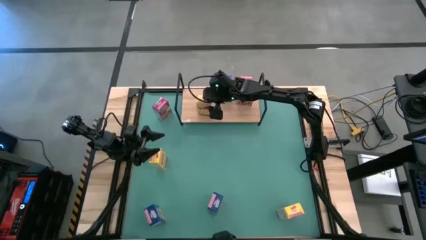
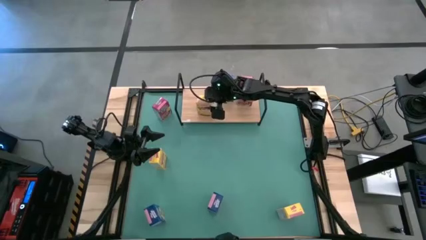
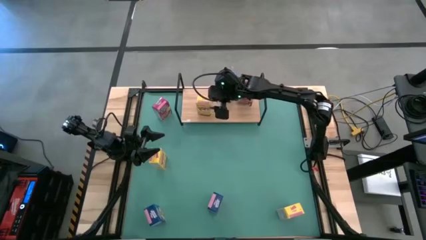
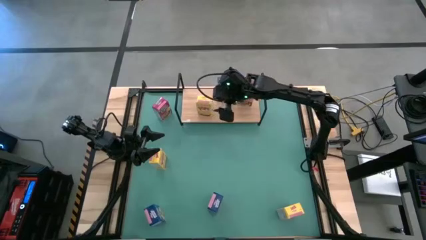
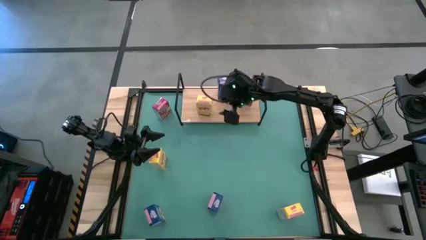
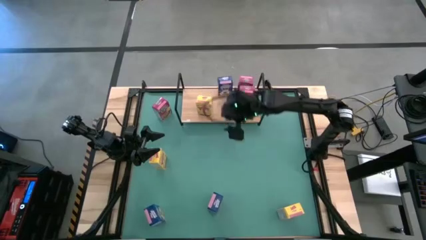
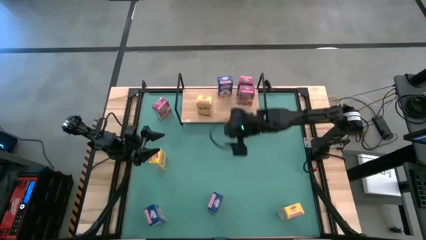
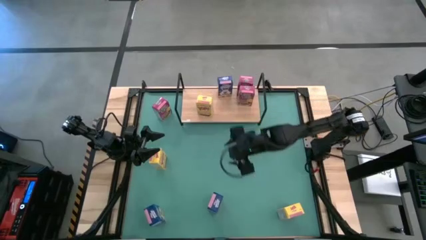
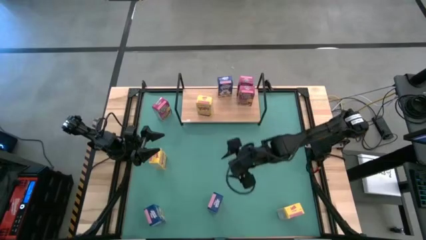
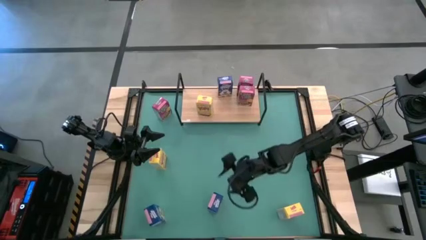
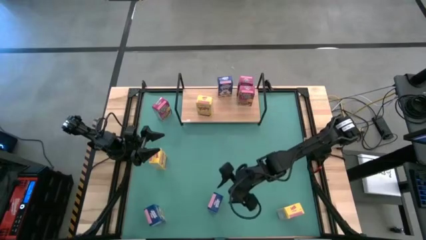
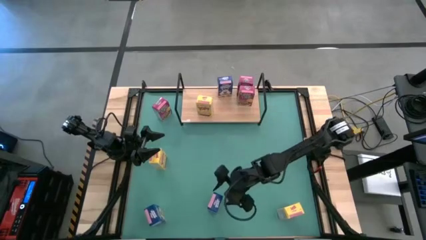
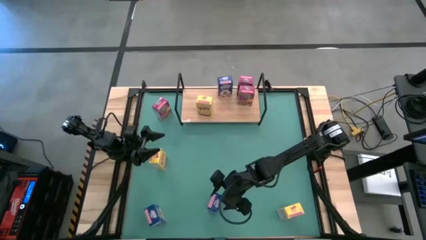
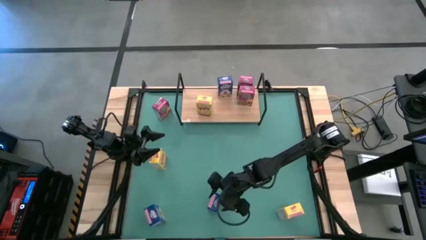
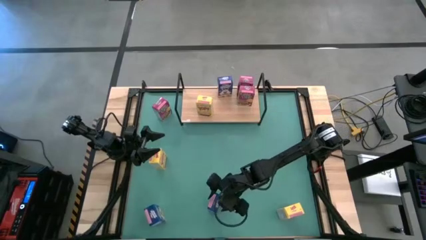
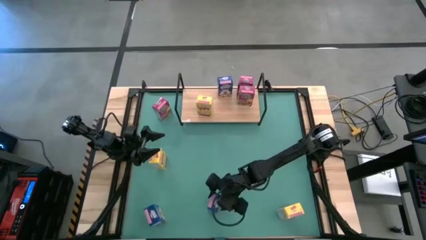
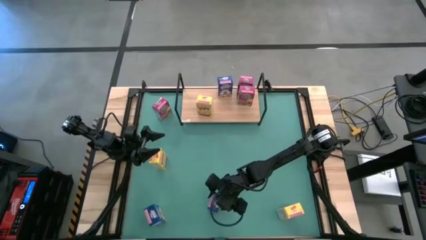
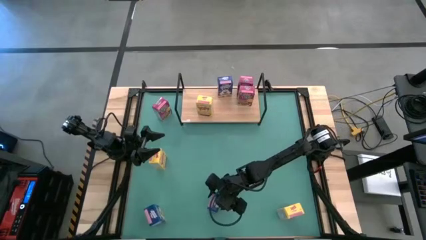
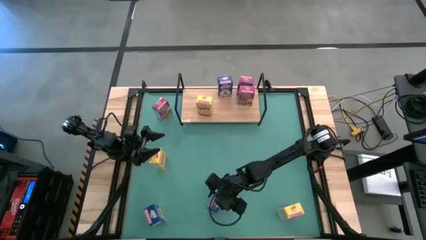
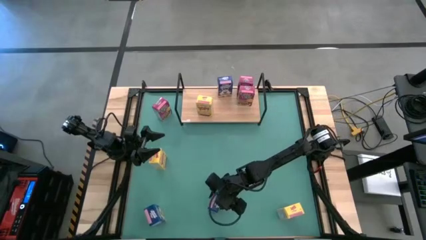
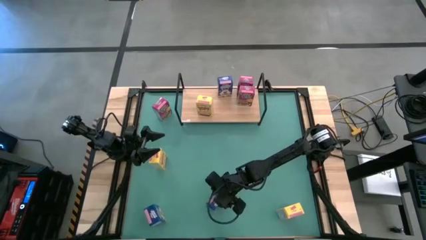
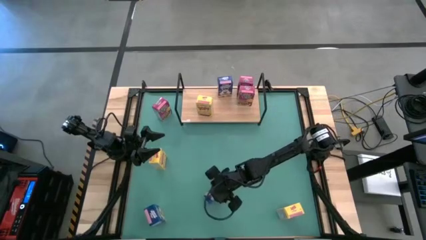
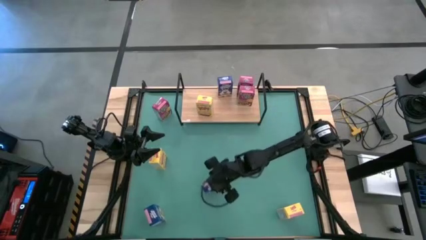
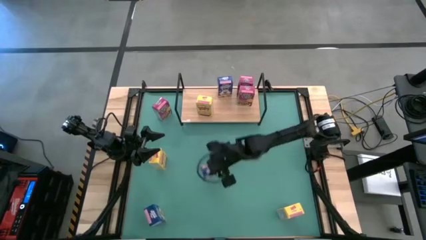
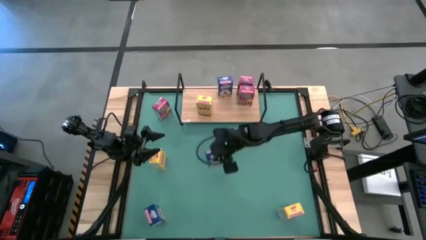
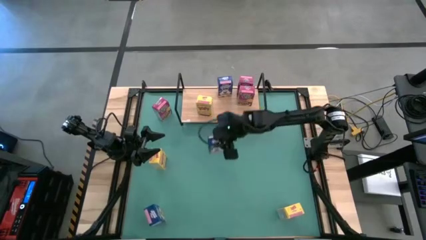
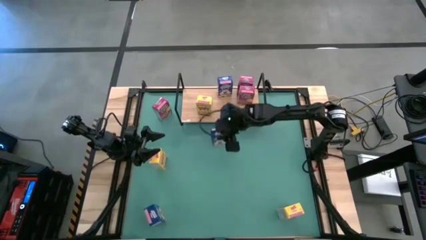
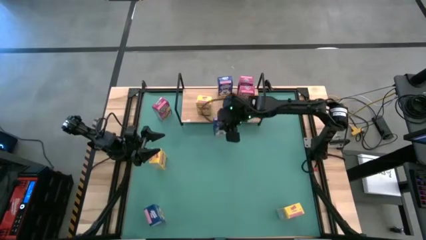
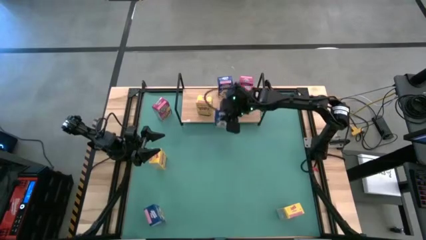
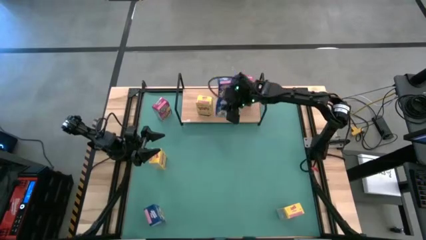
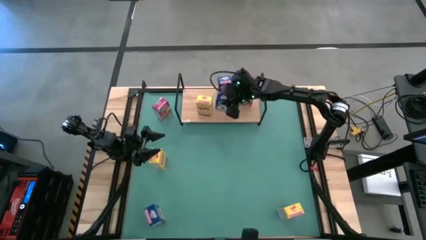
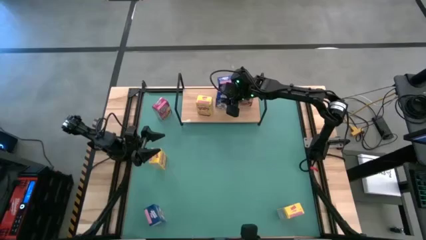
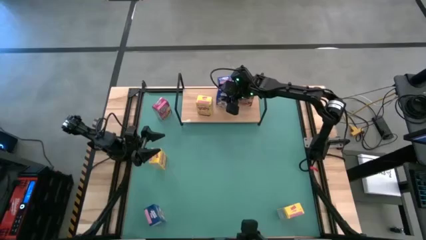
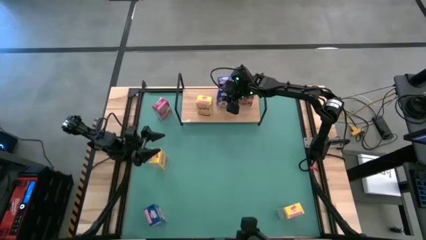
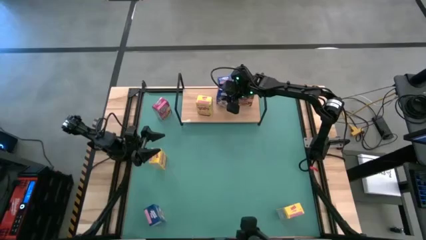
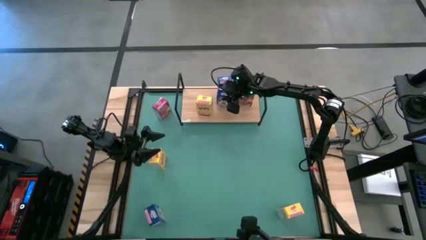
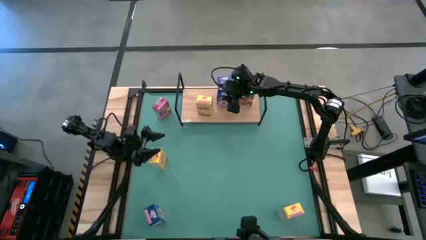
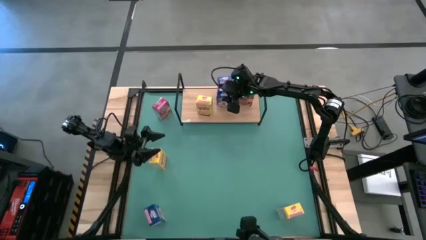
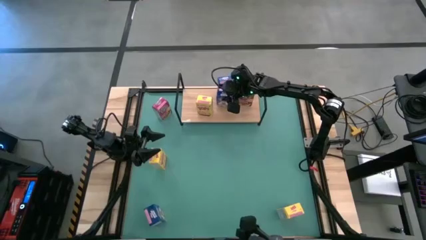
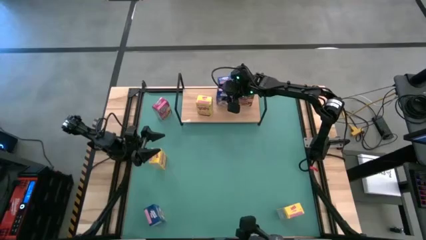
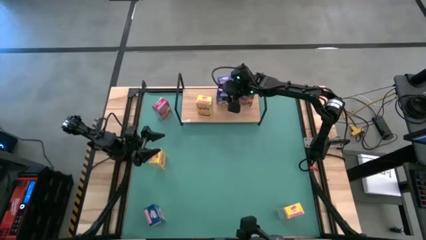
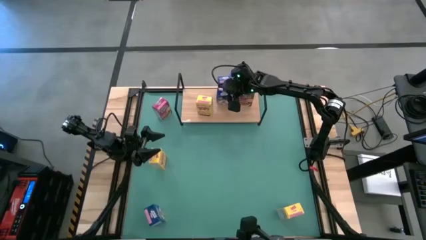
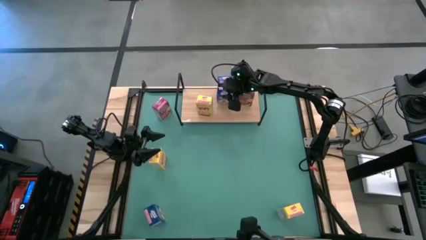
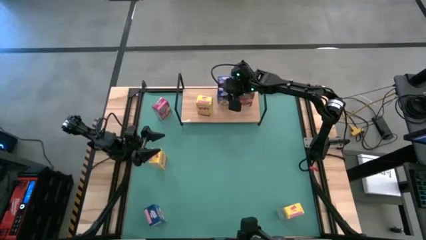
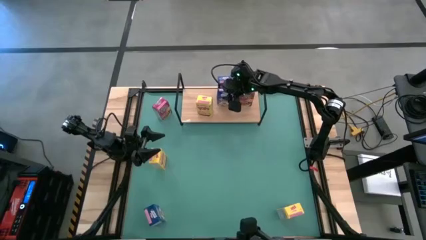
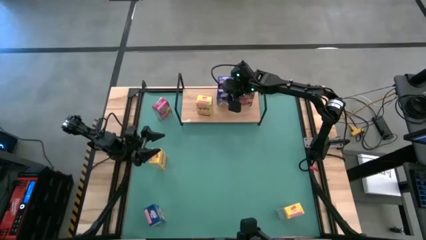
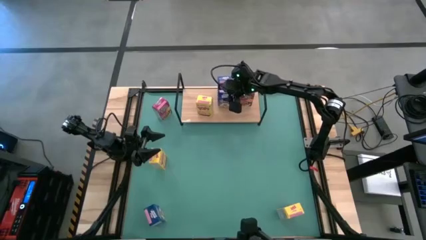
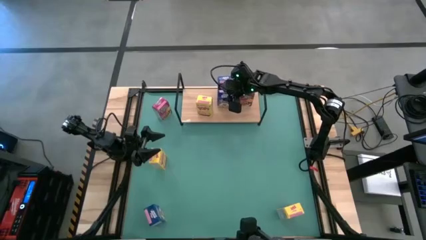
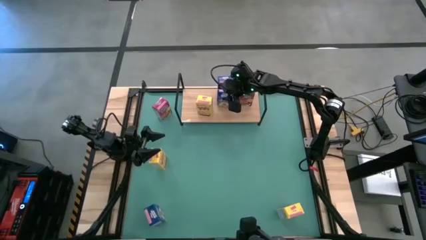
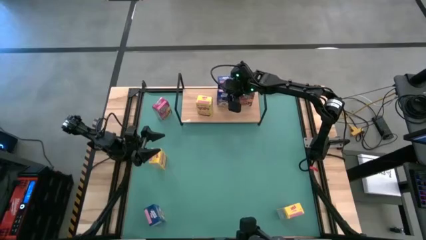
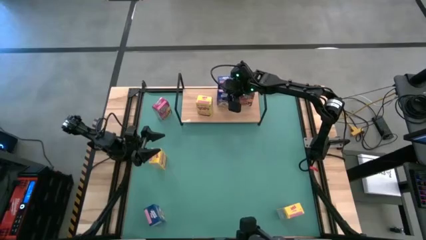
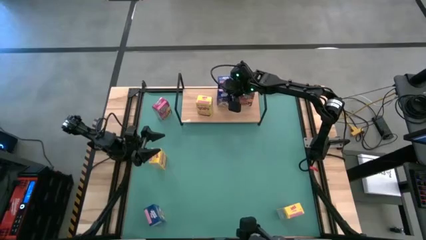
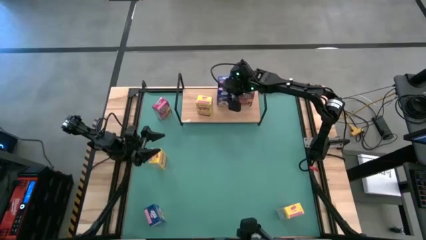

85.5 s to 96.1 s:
Task: Stack cereal on shelf
Put the right blue cereal box on the shelf aligned with the other blue cereal box

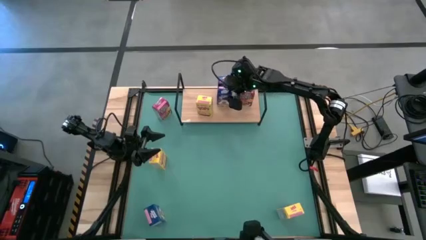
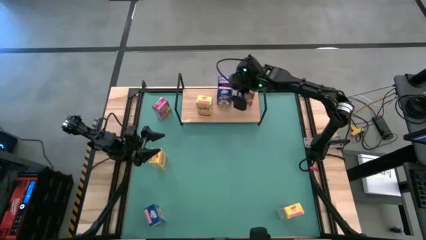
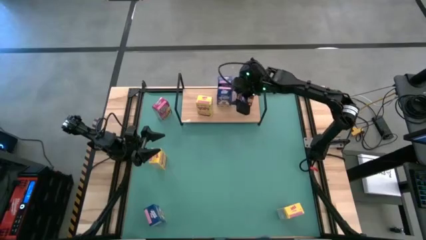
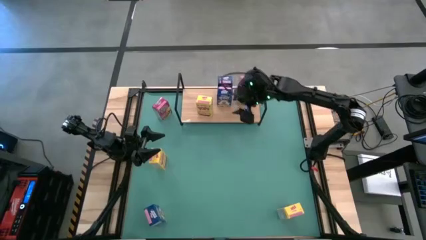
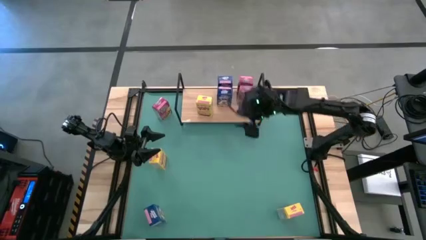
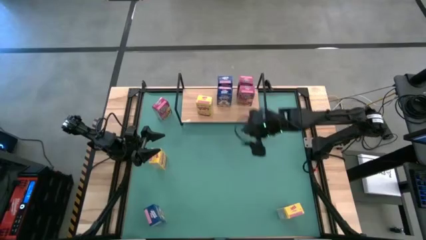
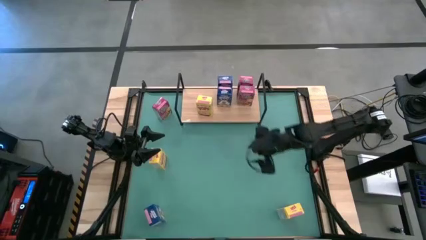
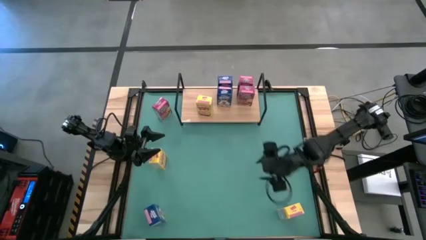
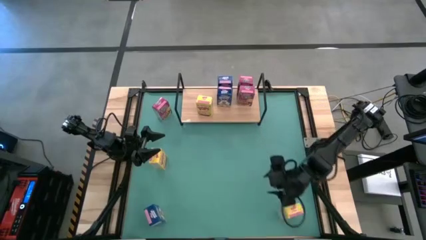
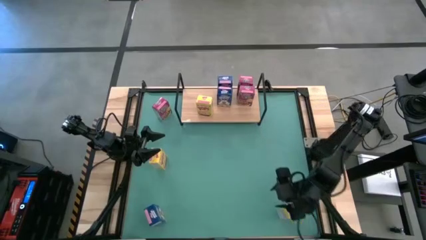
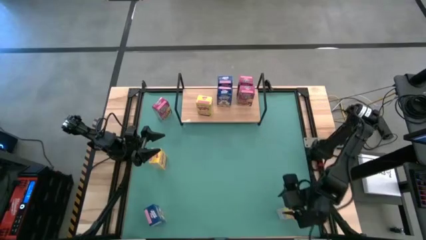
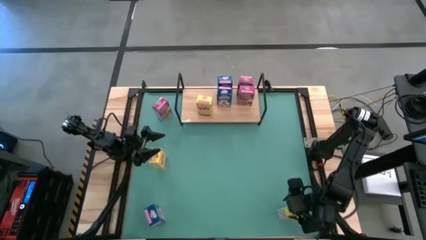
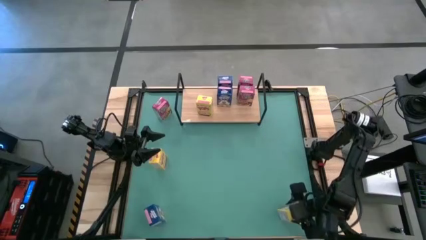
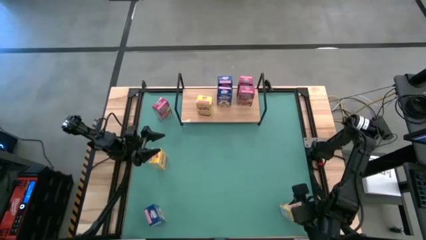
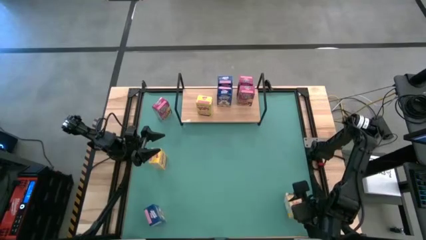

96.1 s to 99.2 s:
Put the right yellow cereal box on the shelf aligned with the other yellow cereal box

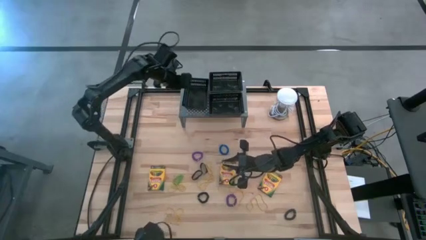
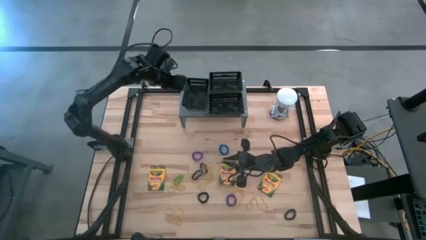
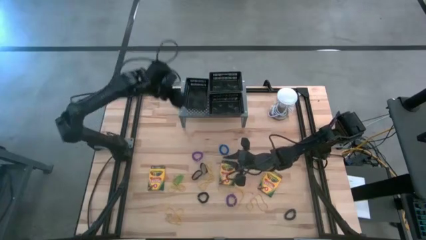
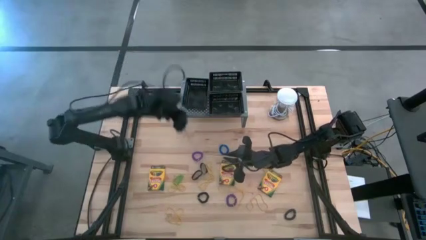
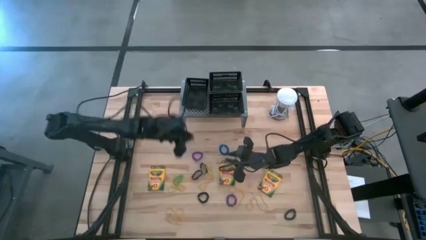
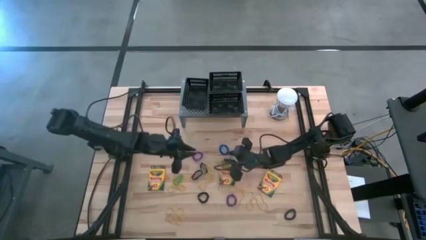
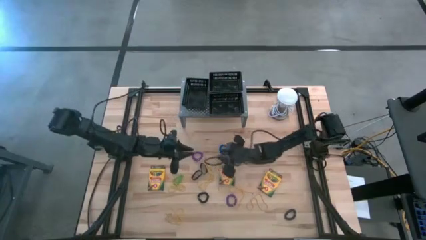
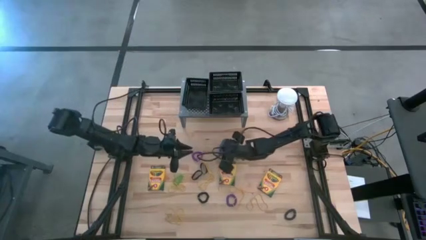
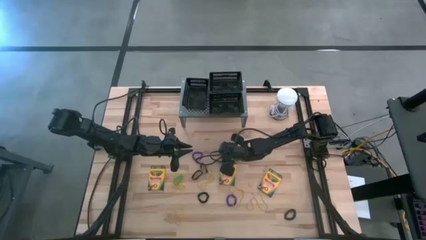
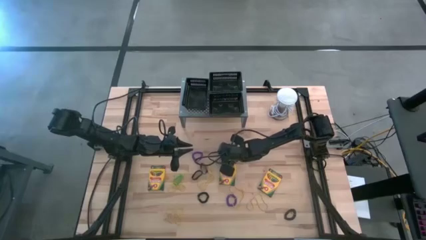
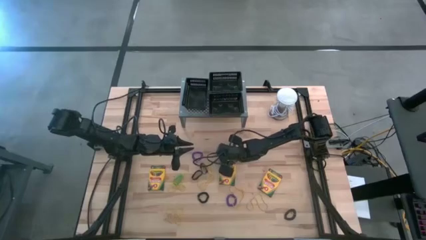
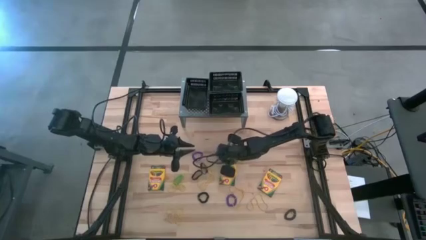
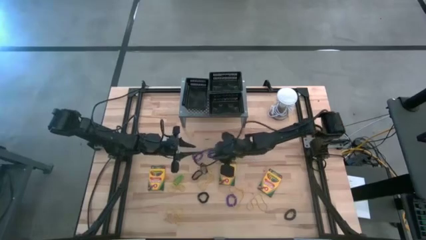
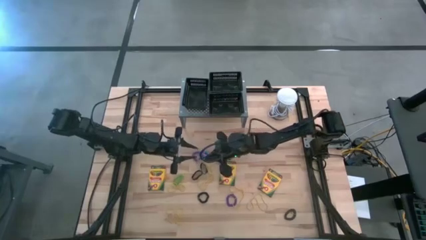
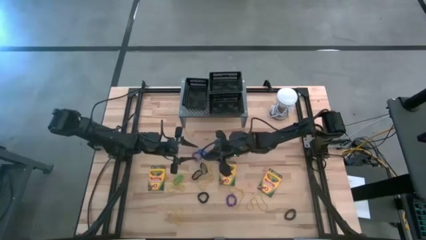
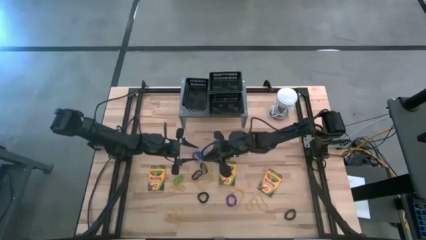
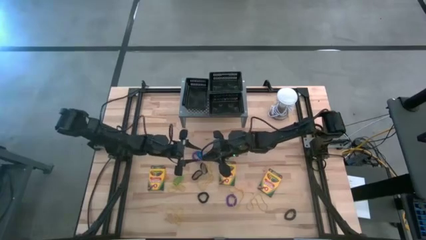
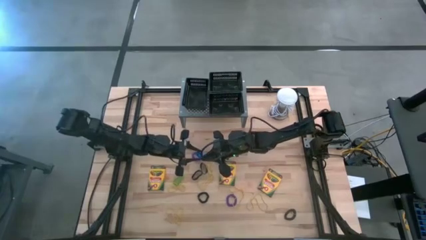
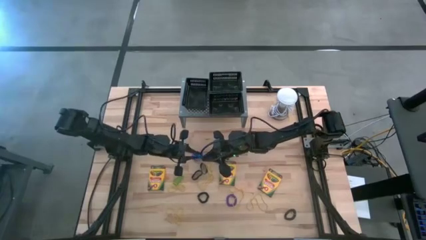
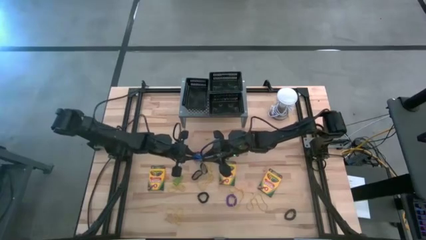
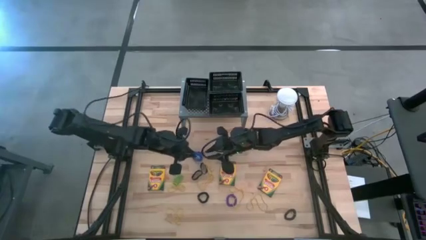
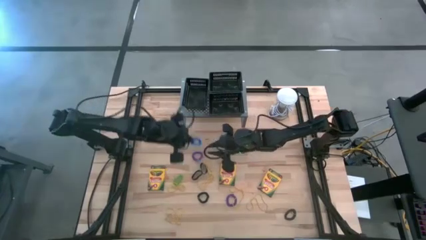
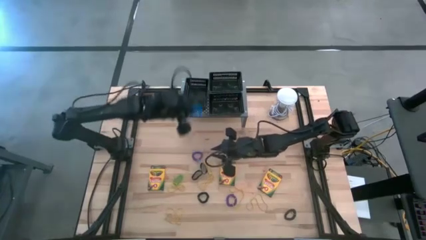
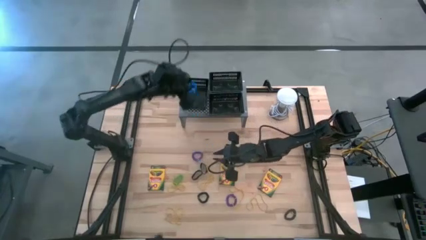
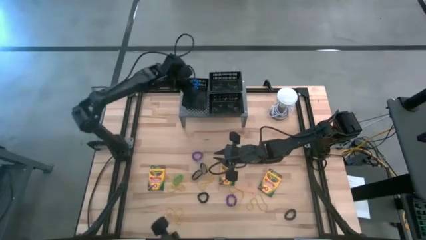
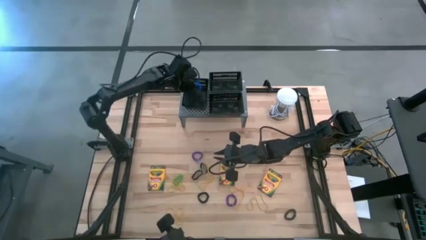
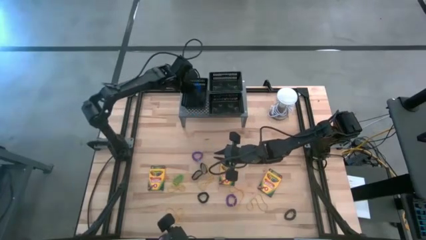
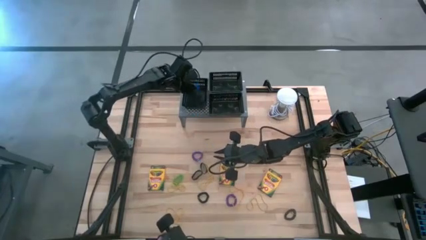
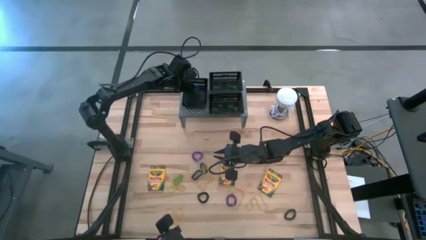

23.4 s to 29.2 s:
Task: Pick & Place Office Desk Supplies
Put the blue spring keychain into the middle black bin on the shelf
